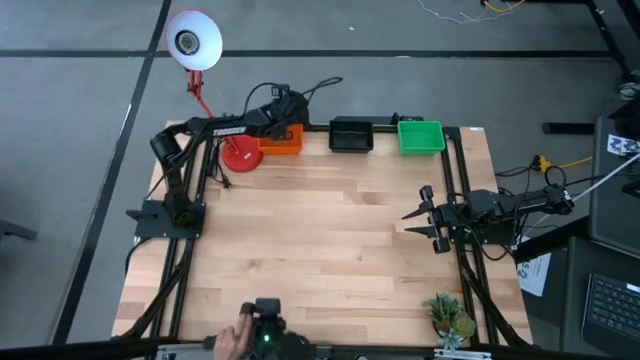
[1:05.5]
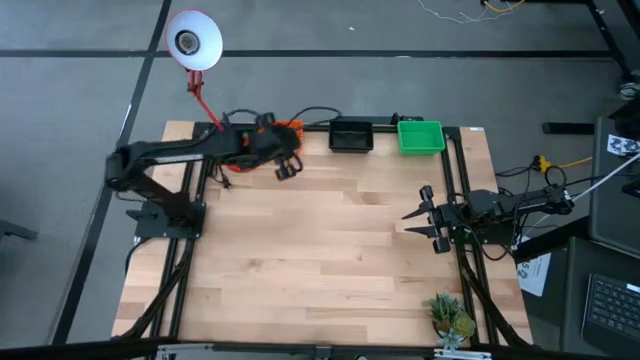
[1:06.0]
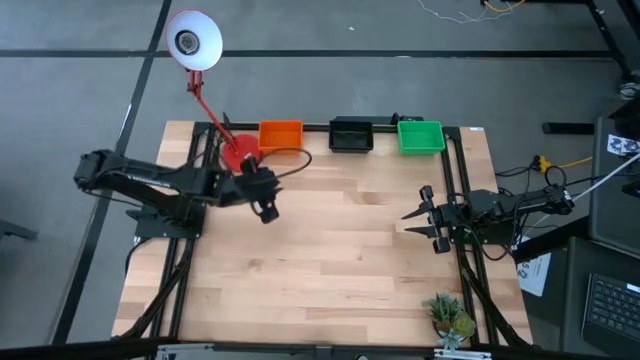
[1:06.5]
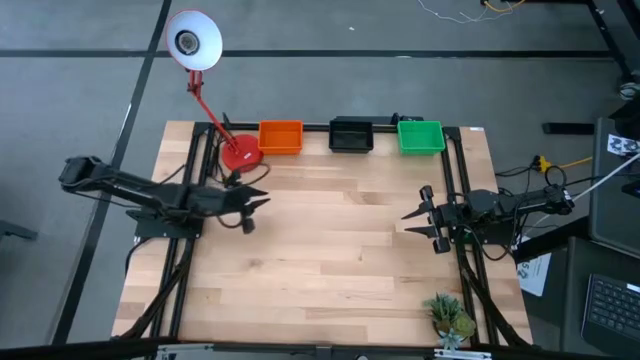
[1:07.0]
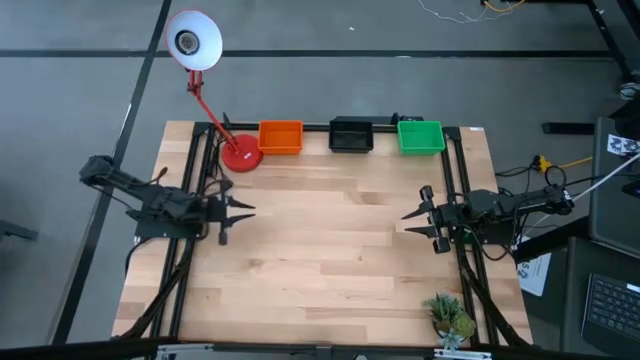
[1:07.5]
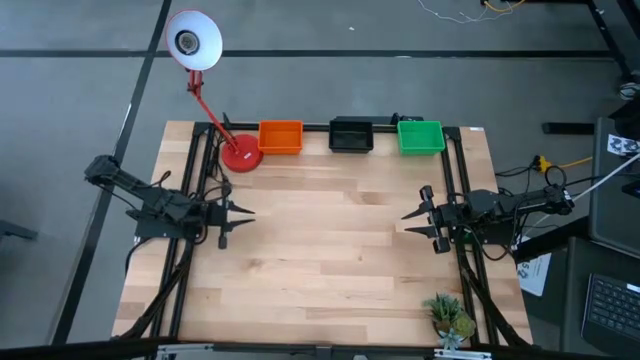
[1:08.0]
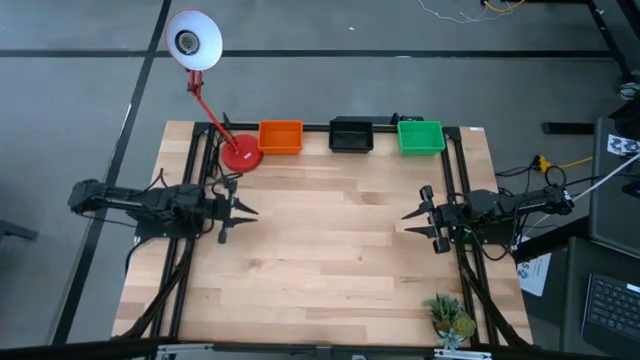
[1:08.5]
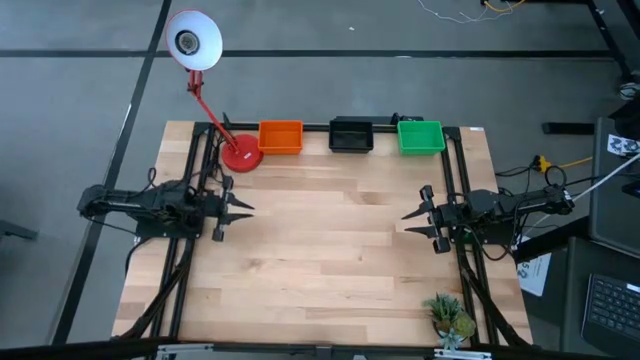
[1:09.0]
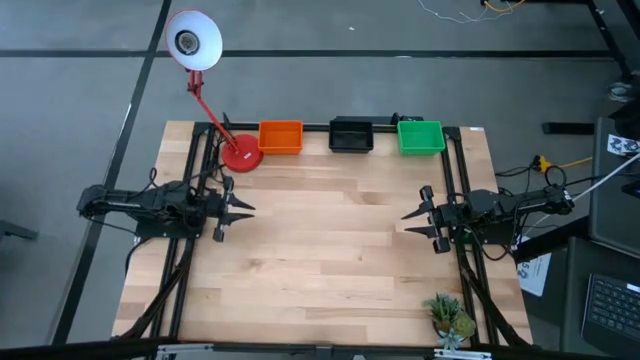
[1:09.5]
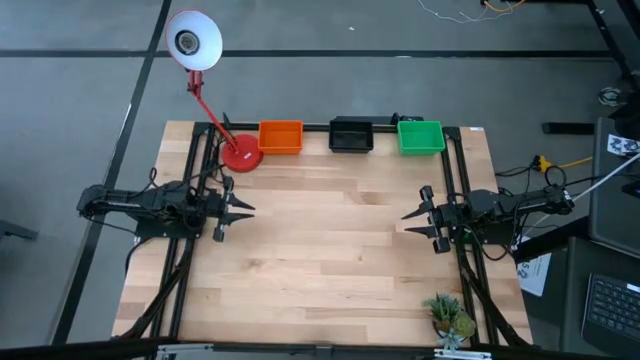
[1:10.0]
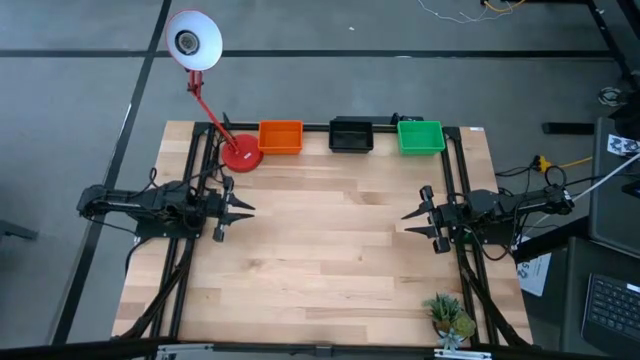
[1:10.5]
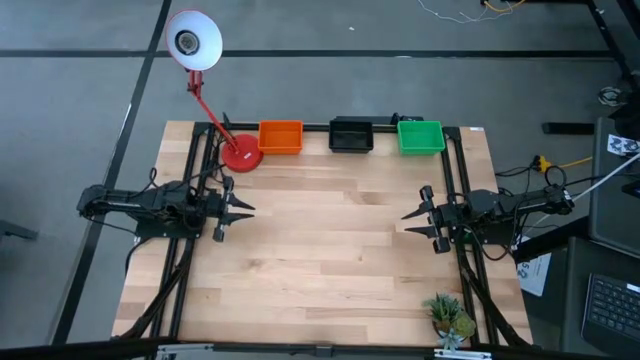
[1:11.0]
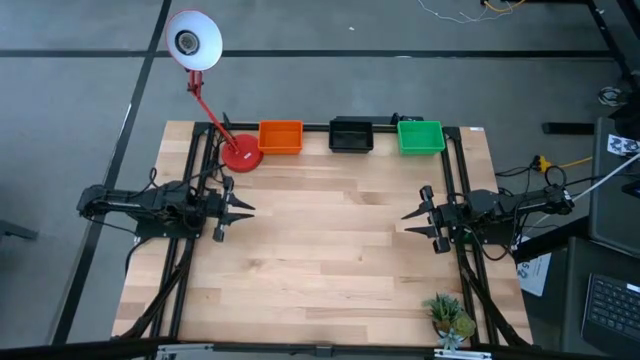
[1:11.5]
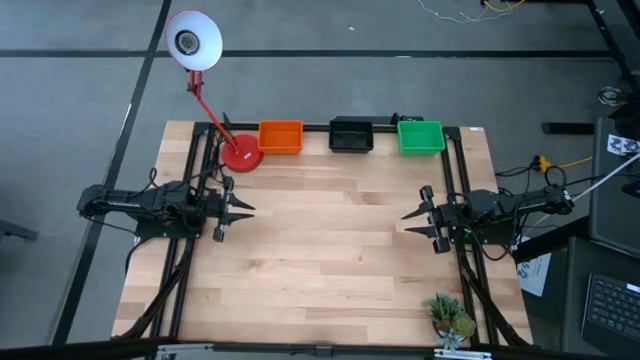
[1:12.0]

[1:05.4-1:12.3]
Return to Home Position

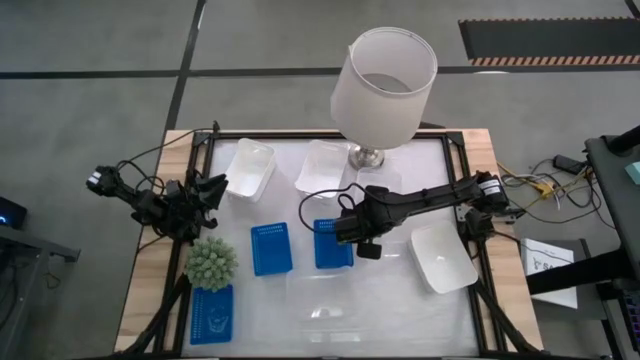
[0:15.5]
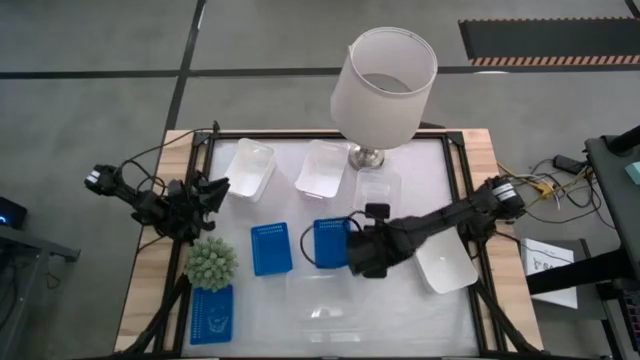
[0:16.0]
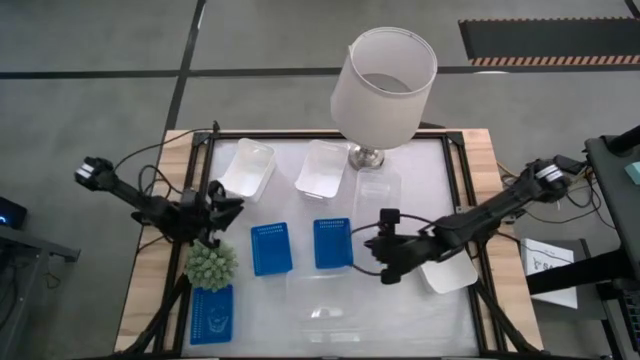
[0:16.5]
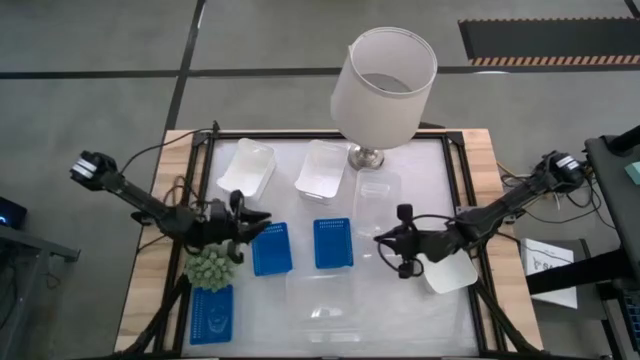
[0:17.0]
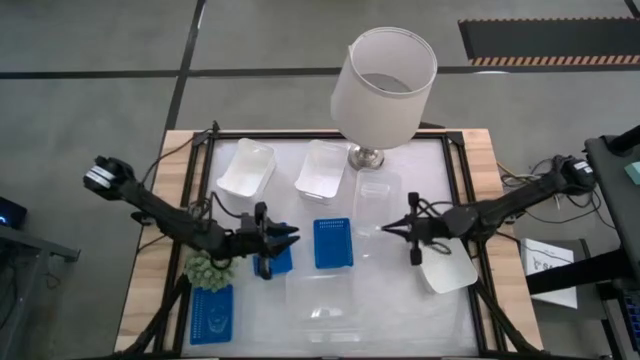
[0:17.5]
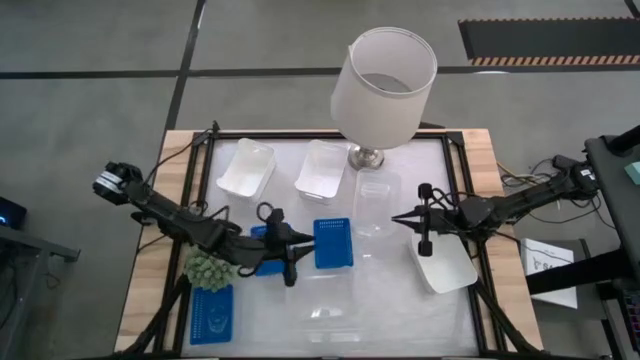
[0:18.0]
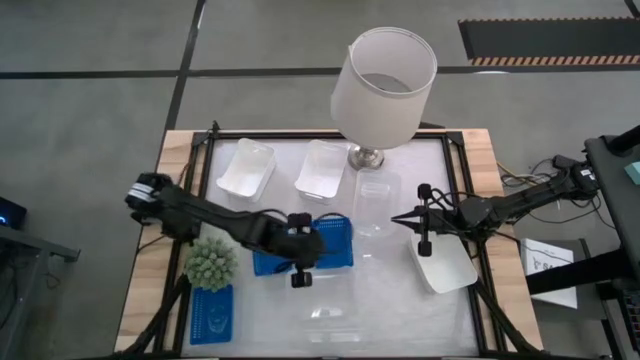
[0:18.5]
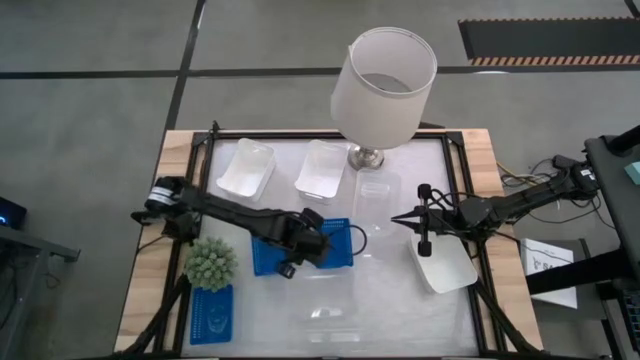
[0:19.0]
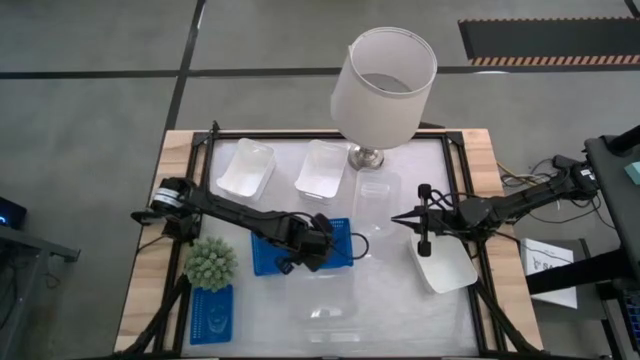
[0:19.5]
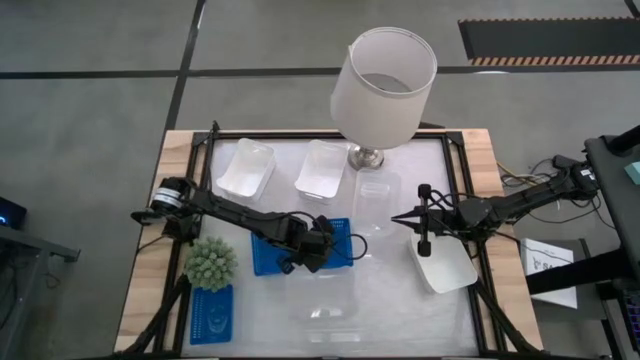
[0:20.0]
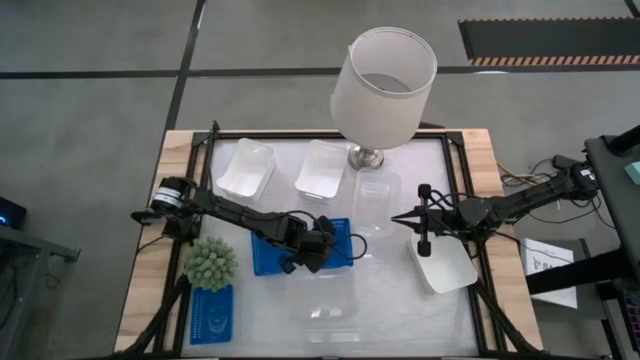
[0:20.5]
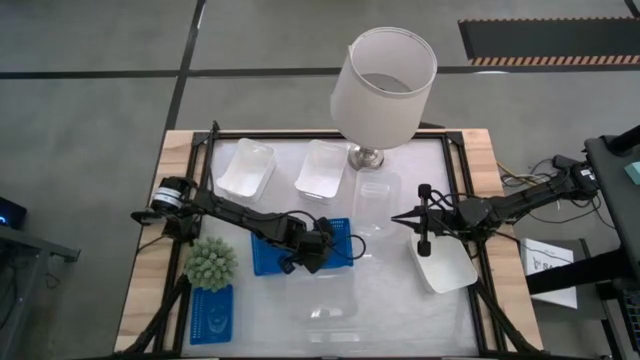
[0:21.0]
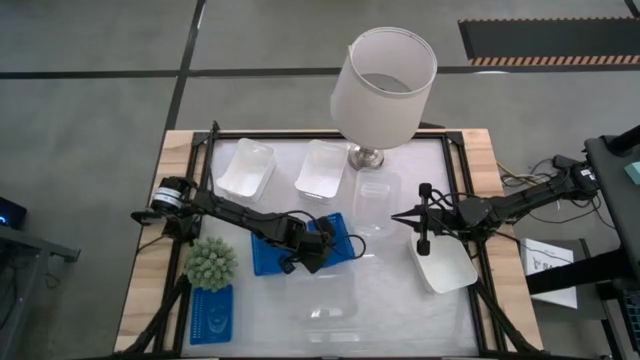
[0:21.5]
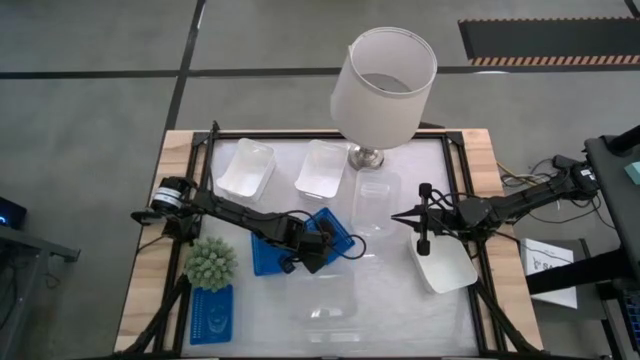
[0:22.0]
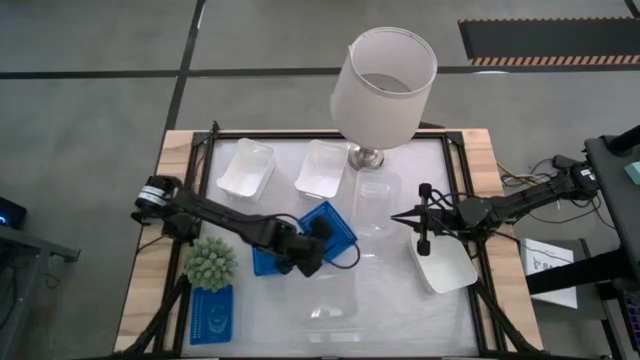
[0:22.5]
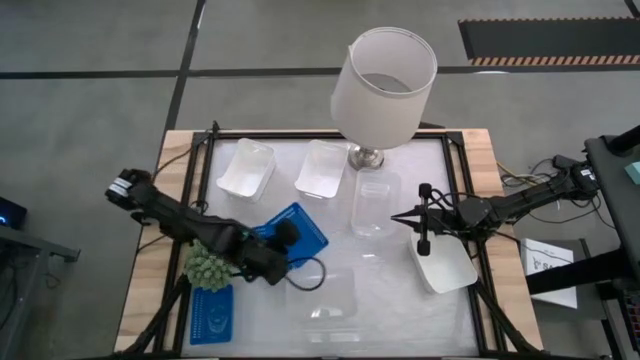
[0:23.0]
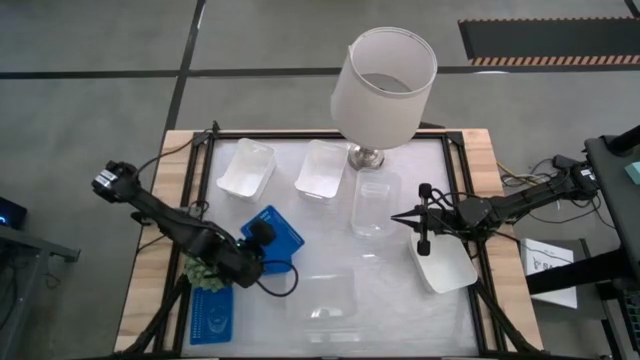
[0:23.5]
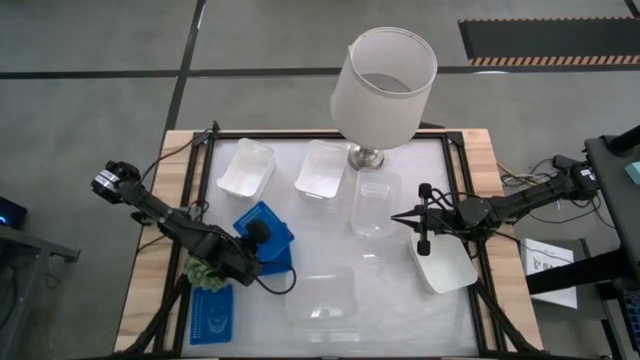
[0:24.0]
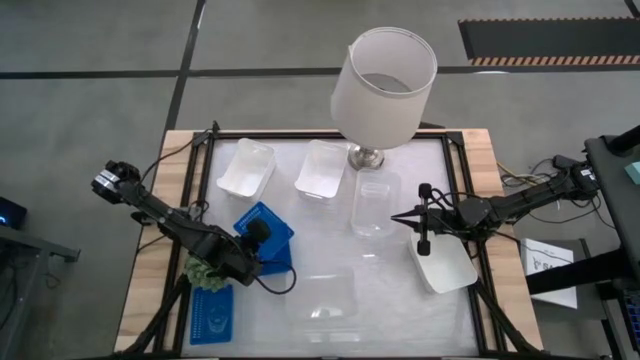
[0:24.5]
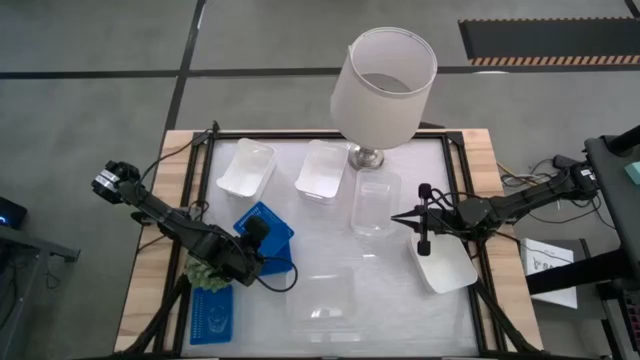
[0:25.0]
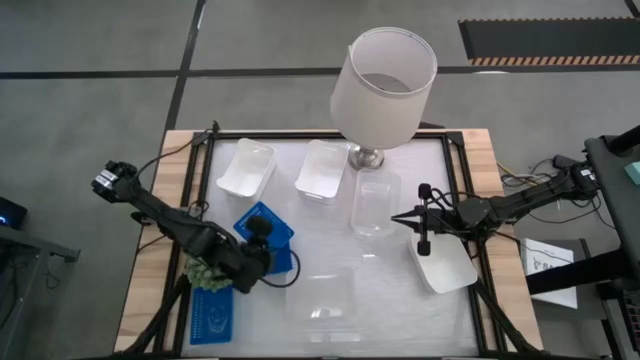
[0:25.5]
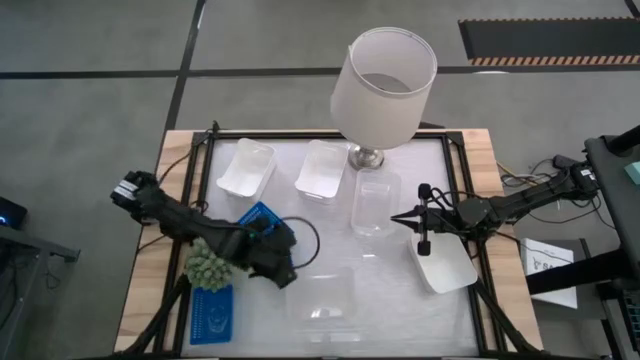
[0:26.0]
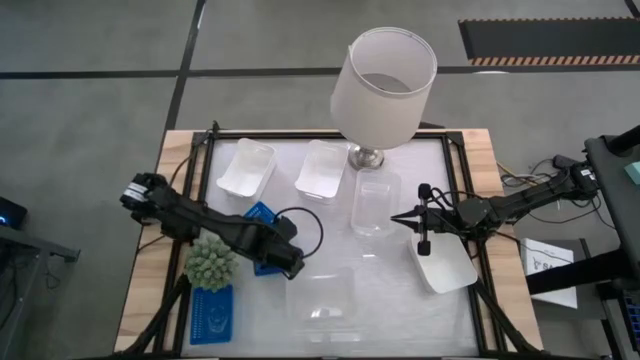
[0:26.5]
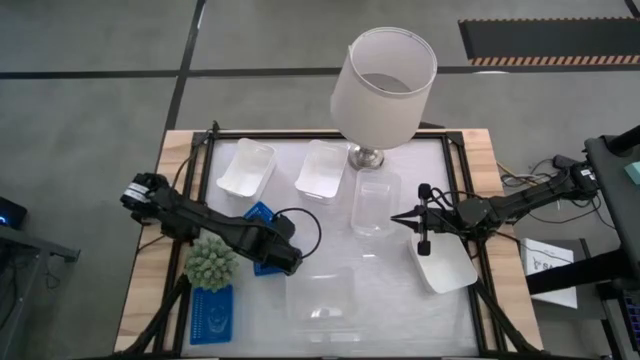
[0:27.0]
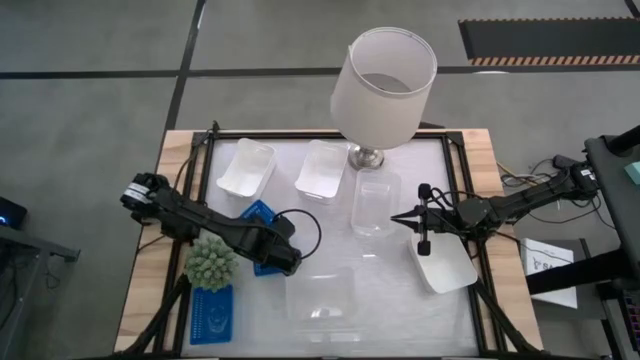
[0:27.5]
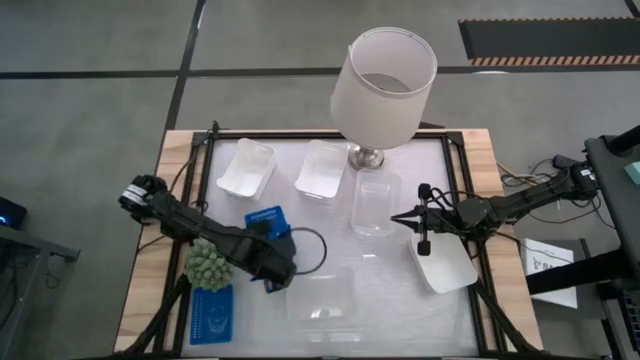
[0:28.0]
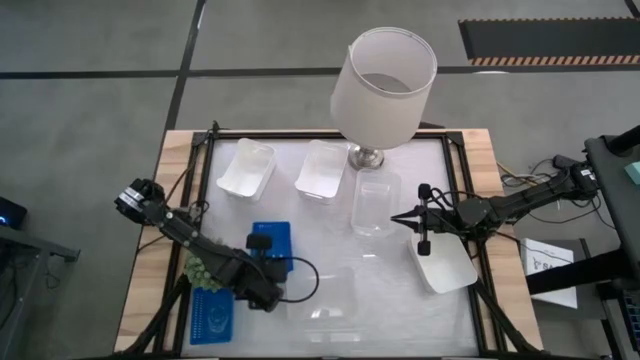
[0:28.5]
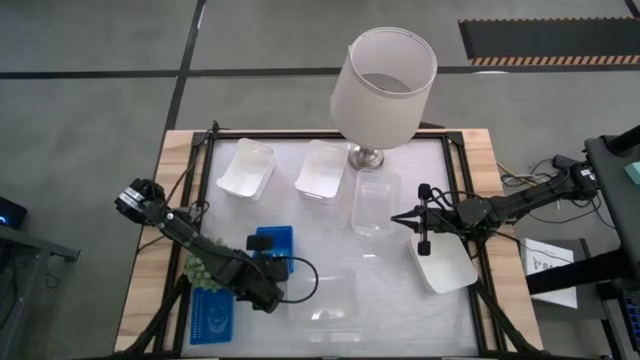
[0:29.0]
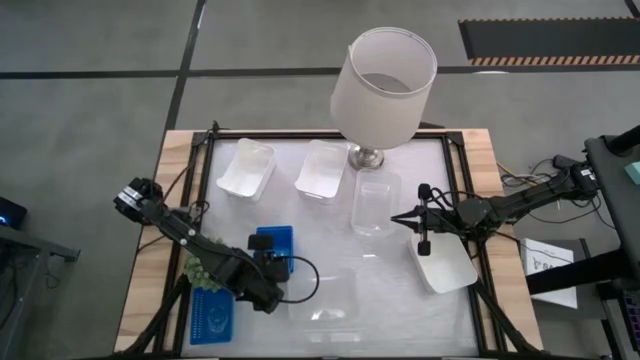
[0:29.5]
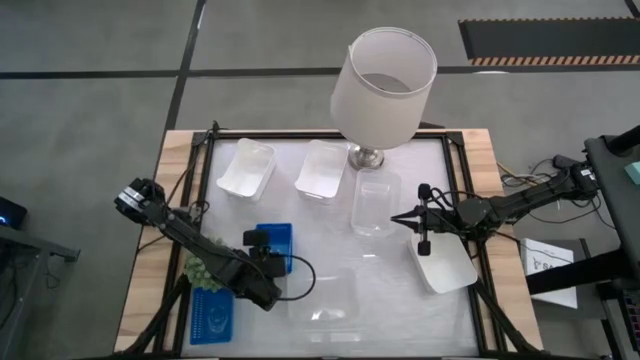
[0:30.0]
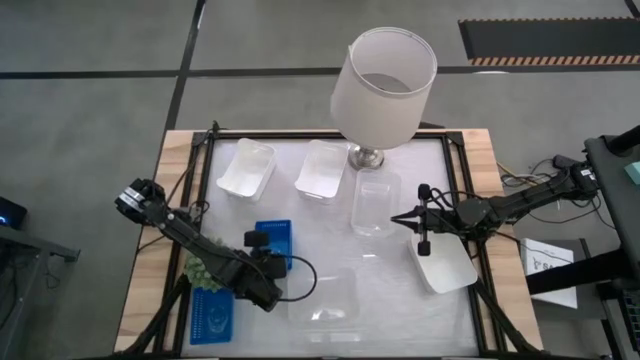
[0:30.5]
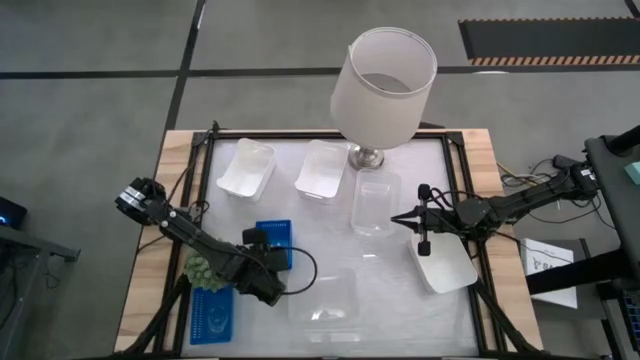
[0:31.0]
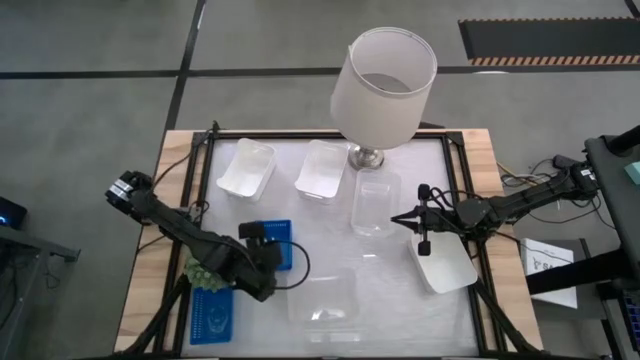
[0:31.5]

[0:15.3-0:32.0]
Stack the right blue bin on the middle blue bin
